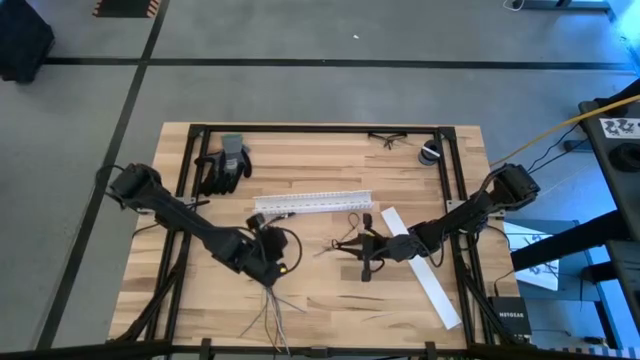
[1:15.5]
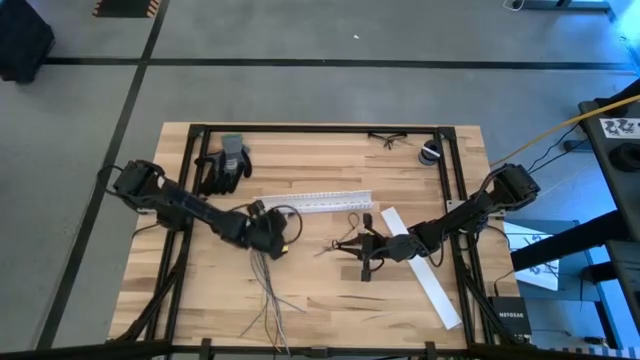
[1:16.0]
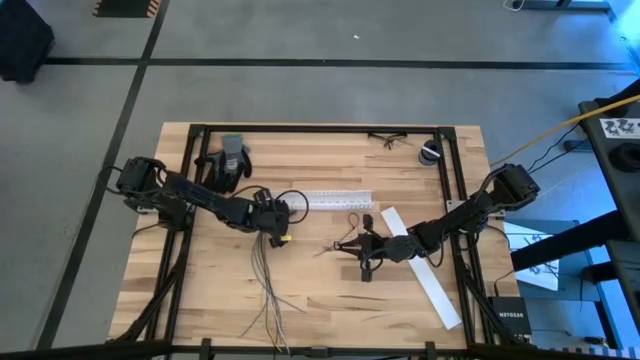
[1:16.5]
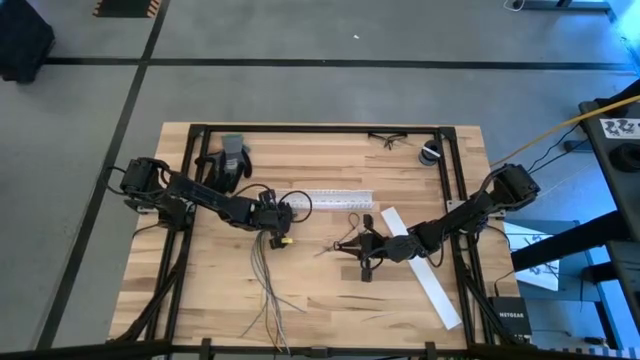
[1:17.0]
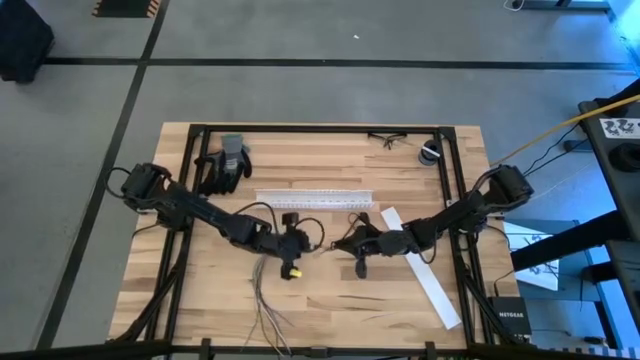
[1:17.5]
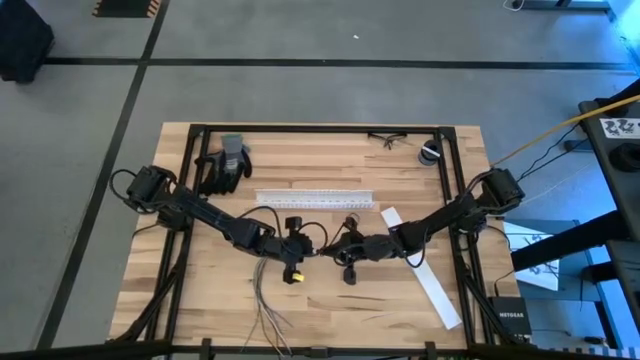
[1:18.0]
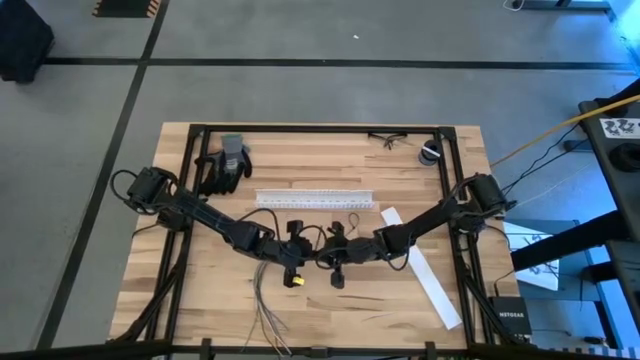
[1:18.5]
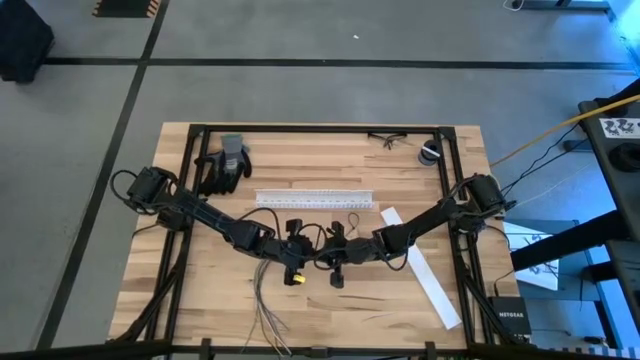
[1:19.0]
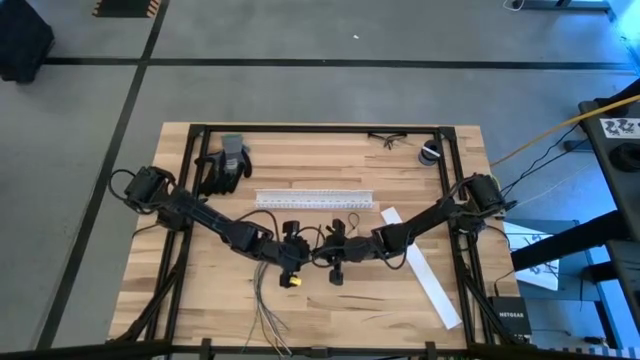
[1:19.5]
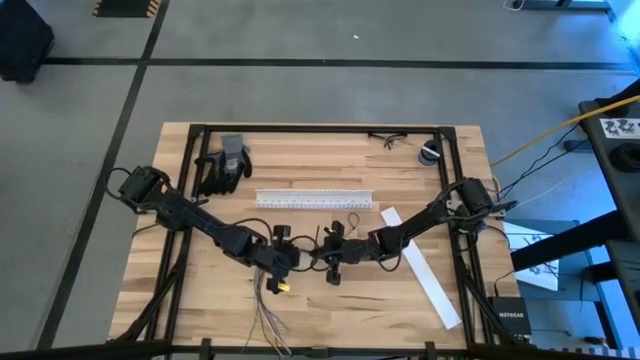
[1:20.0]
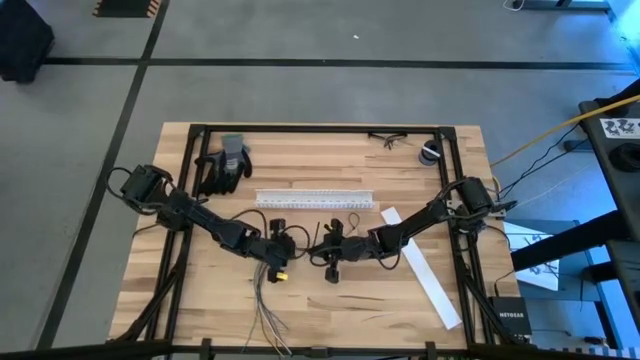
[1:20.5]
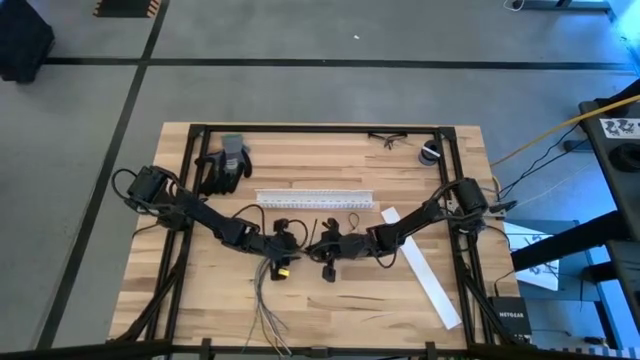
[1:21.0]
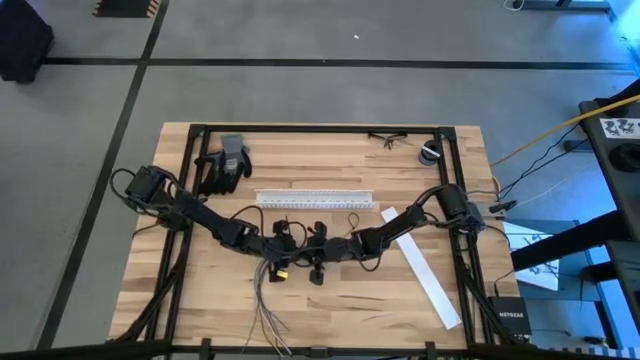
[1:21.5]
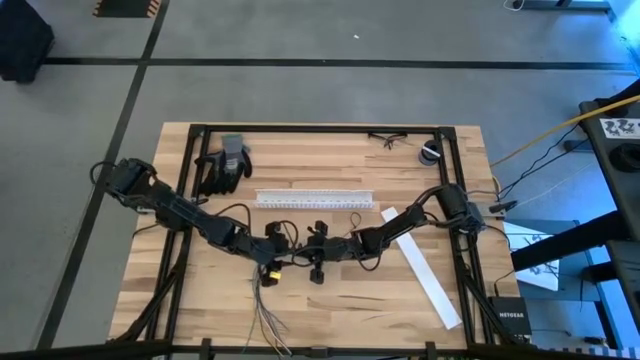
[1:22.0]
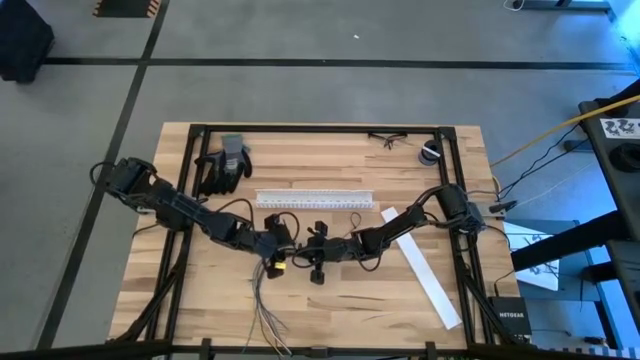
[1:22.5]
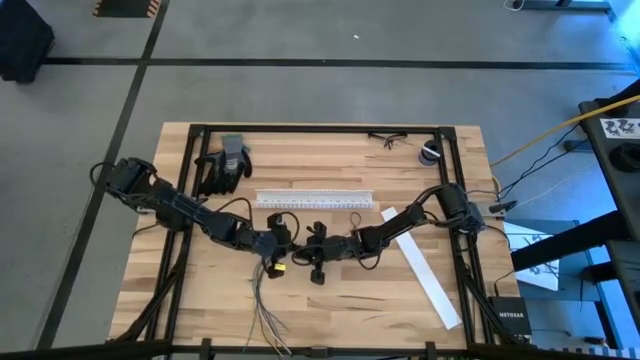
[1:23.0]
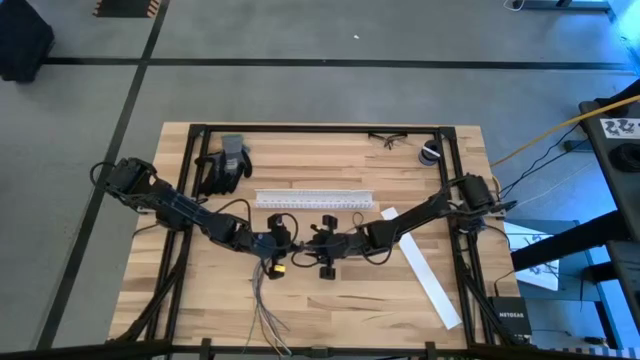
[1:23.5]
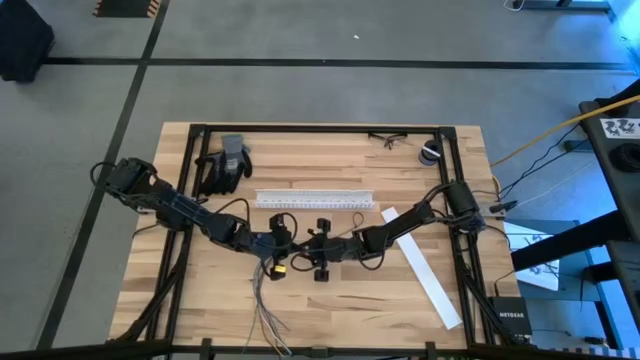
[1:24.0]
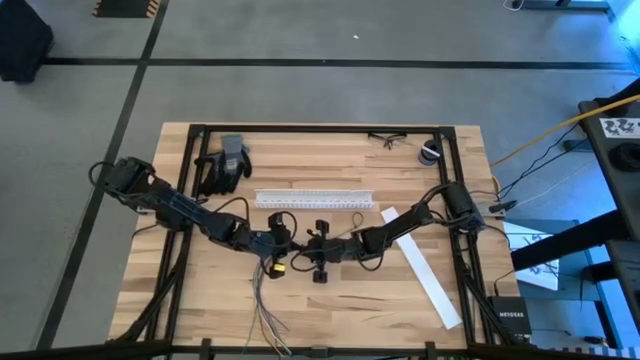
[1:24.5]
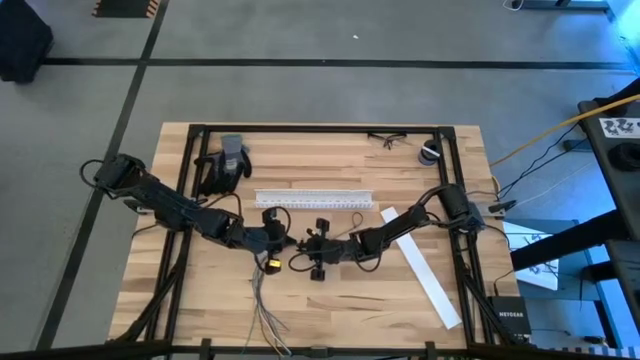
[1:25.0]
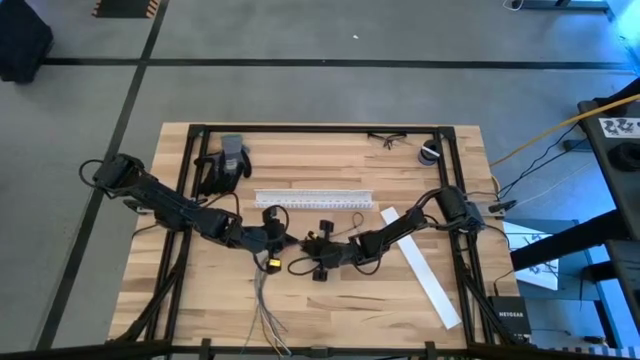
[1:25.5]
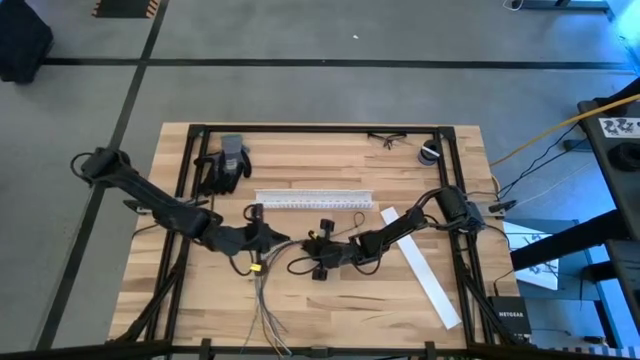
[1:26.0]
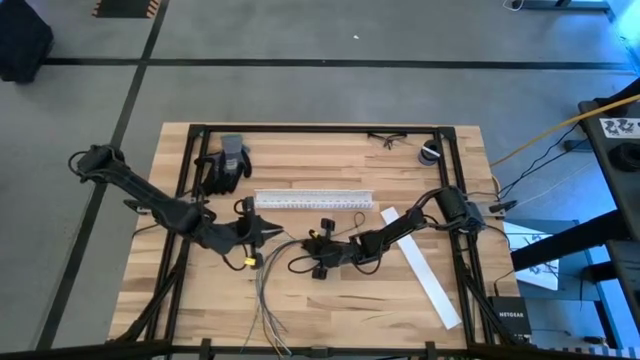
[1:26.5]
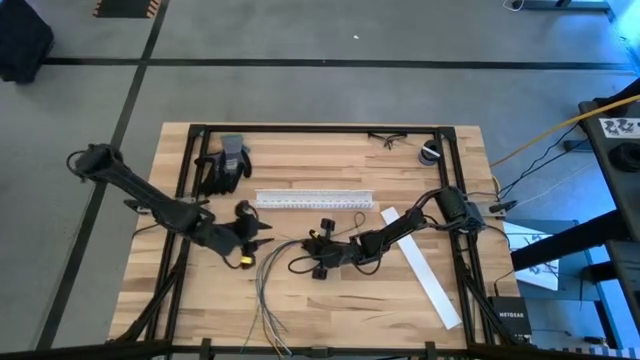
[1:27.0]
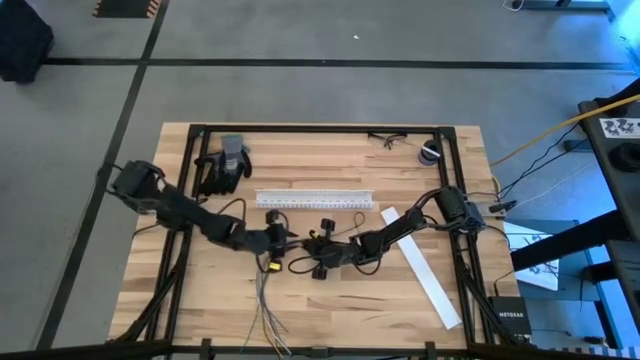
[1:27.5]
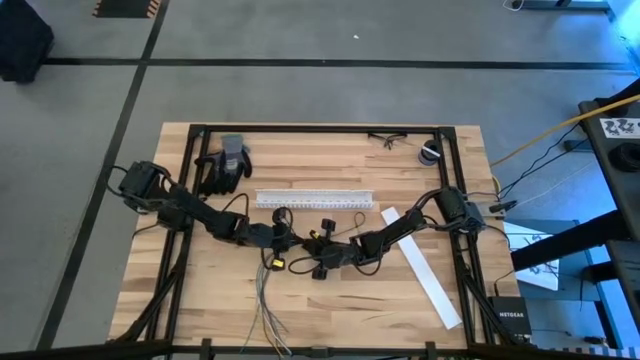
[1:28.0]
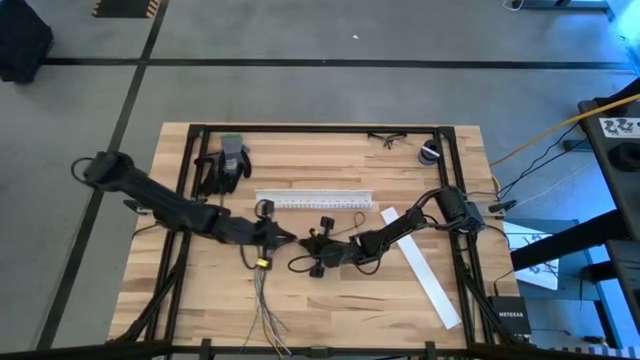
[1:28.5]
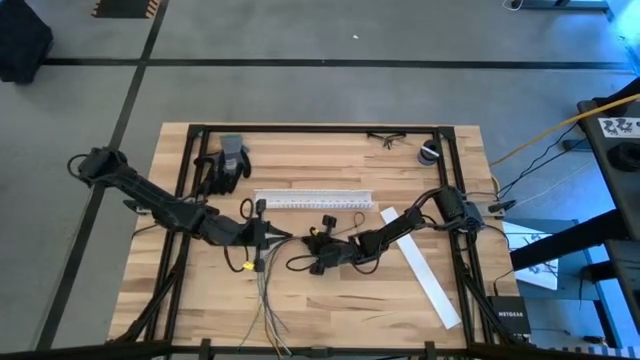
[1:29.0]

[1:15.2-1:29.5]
Task: Ziptie cables
Wrap the cables together using a black ziptie
